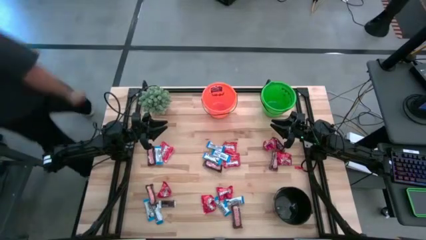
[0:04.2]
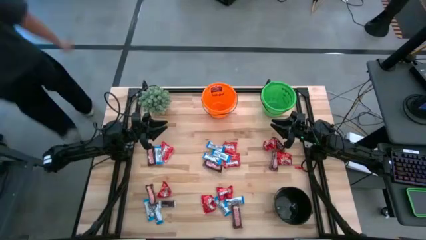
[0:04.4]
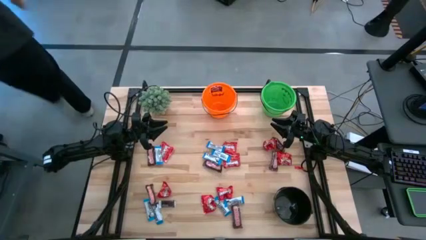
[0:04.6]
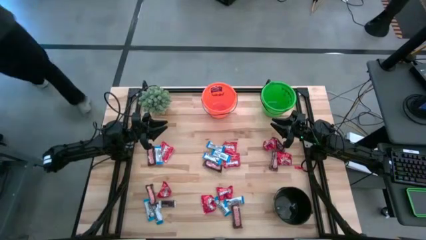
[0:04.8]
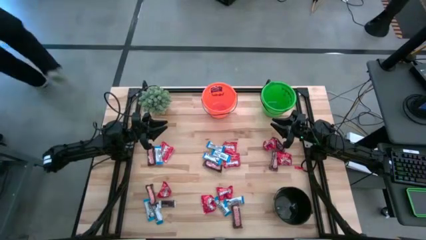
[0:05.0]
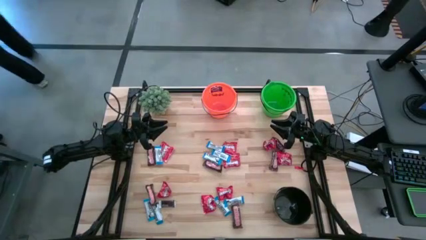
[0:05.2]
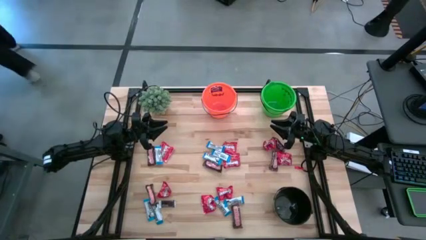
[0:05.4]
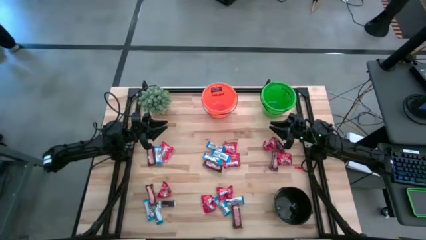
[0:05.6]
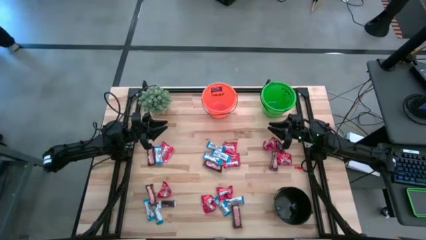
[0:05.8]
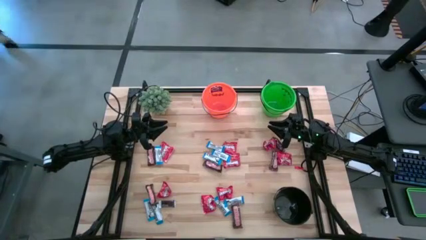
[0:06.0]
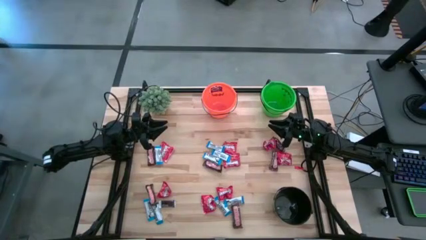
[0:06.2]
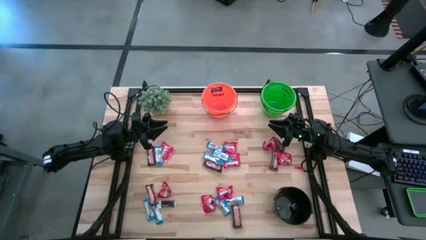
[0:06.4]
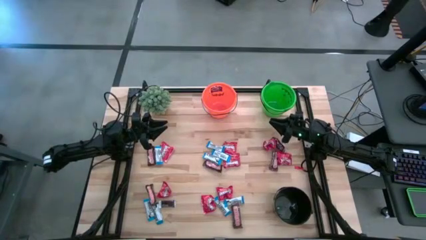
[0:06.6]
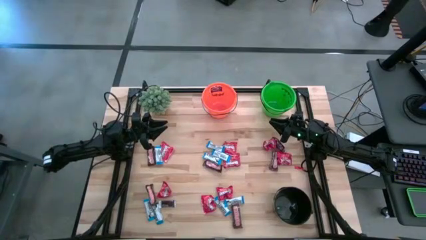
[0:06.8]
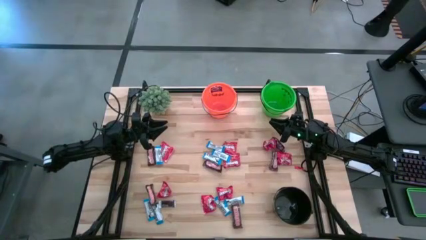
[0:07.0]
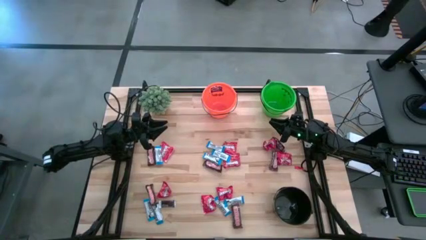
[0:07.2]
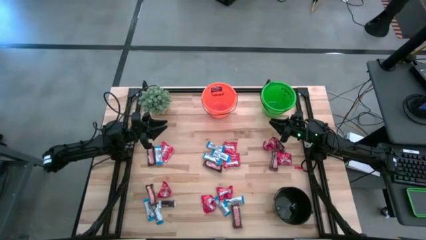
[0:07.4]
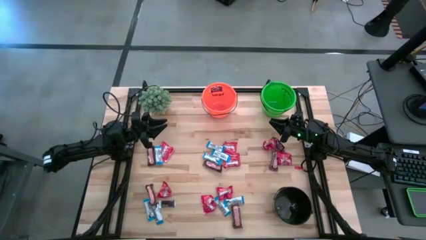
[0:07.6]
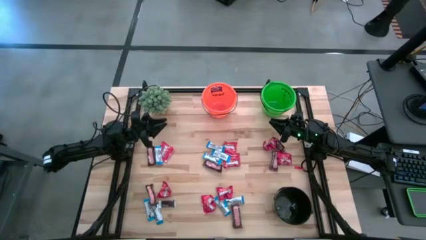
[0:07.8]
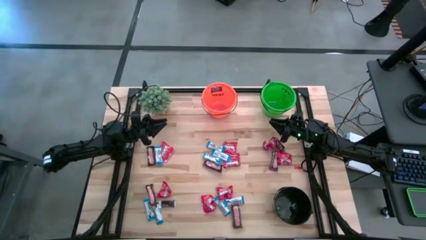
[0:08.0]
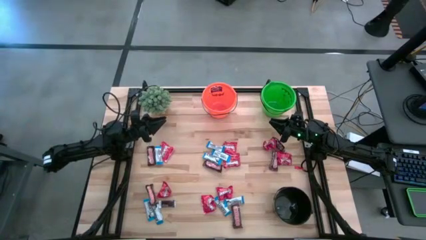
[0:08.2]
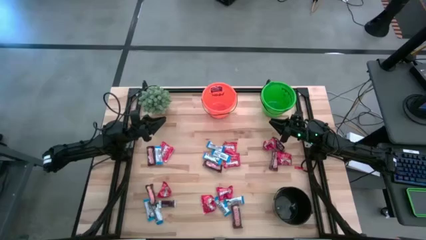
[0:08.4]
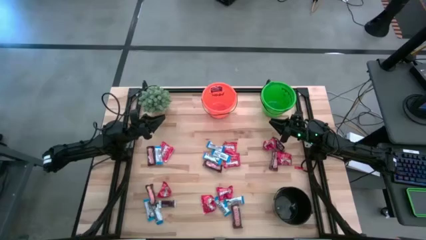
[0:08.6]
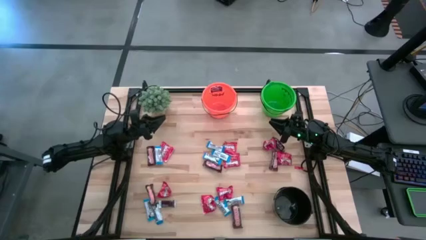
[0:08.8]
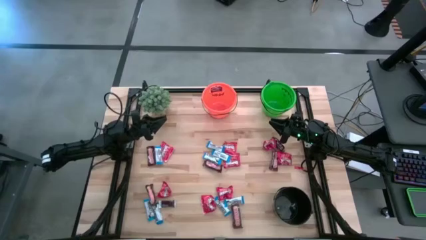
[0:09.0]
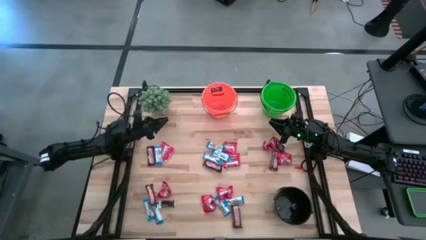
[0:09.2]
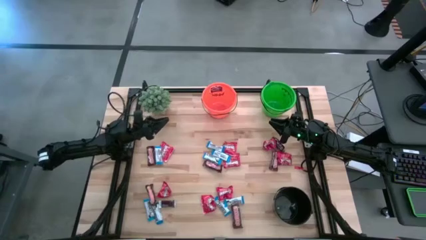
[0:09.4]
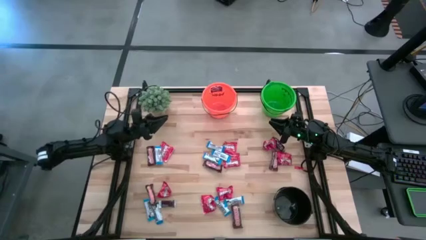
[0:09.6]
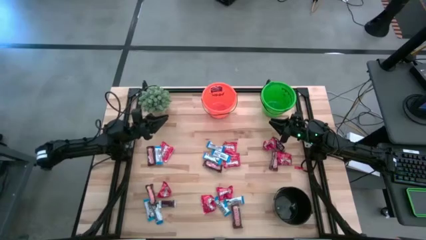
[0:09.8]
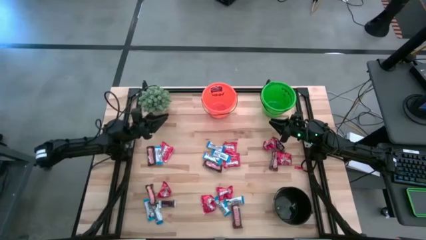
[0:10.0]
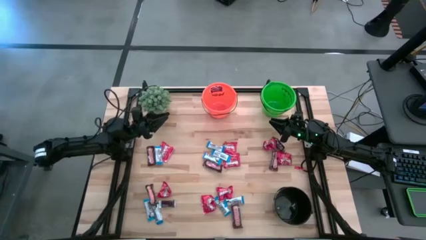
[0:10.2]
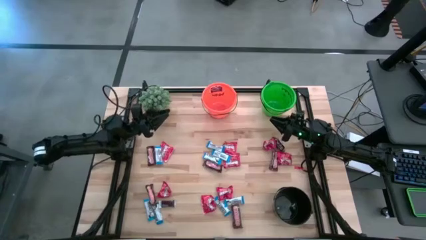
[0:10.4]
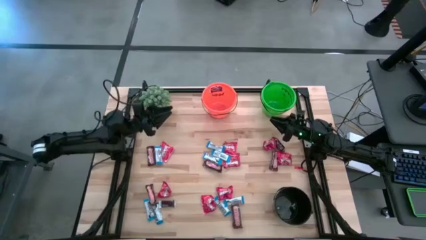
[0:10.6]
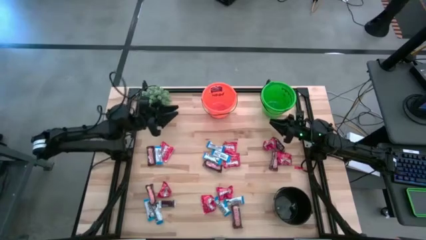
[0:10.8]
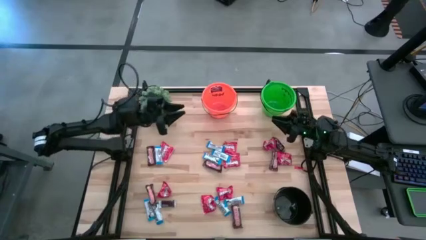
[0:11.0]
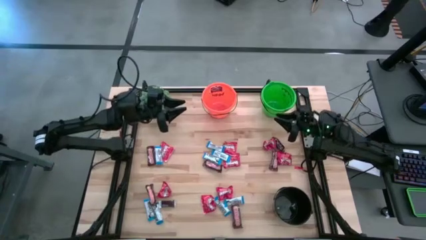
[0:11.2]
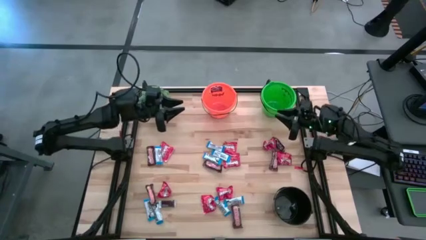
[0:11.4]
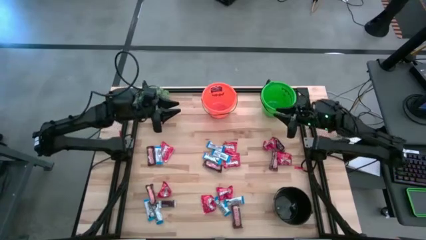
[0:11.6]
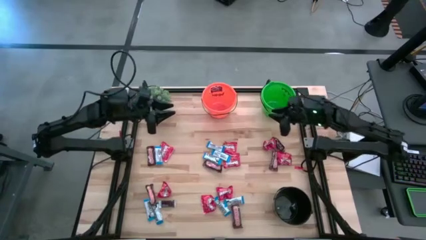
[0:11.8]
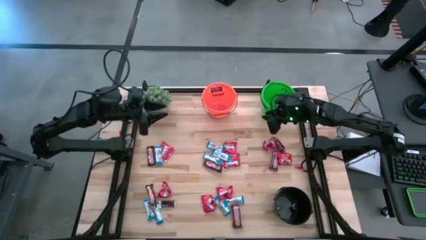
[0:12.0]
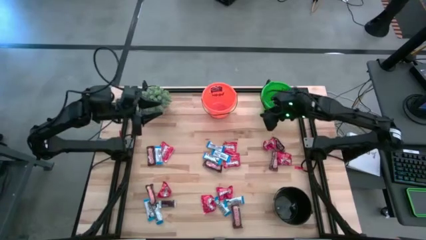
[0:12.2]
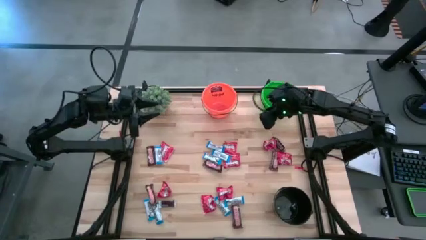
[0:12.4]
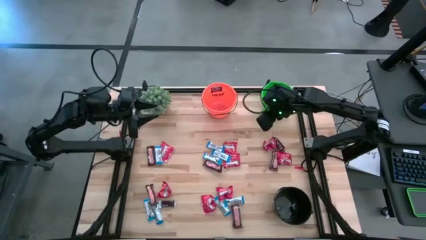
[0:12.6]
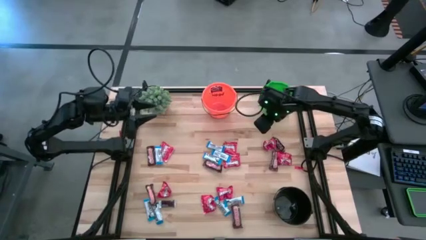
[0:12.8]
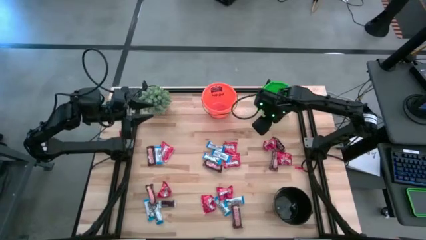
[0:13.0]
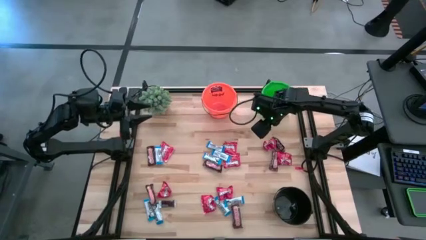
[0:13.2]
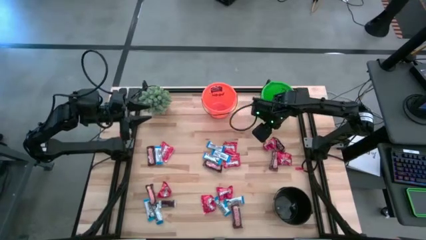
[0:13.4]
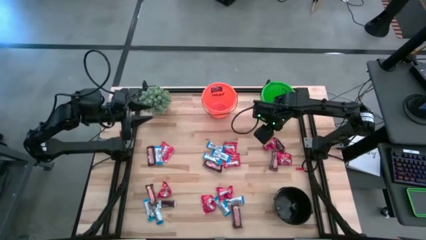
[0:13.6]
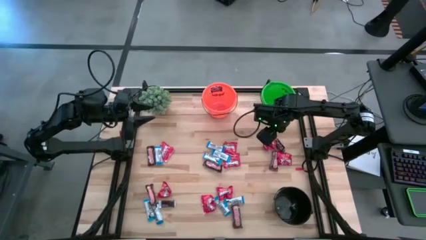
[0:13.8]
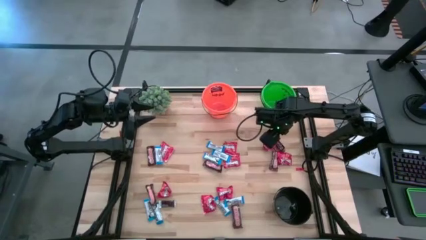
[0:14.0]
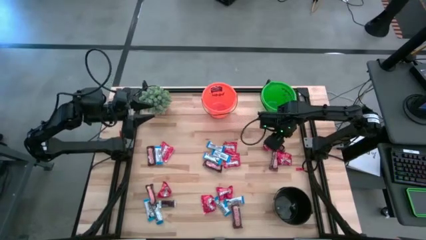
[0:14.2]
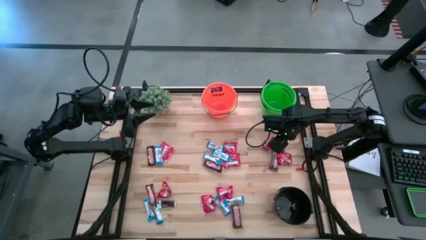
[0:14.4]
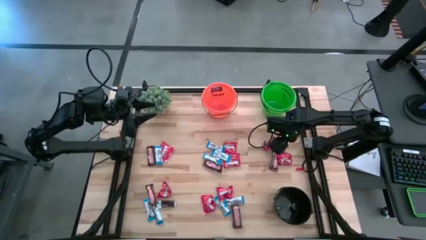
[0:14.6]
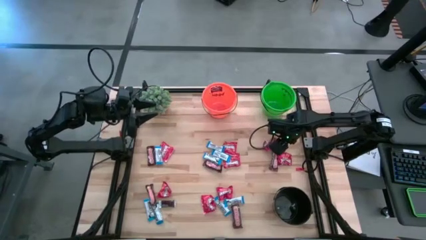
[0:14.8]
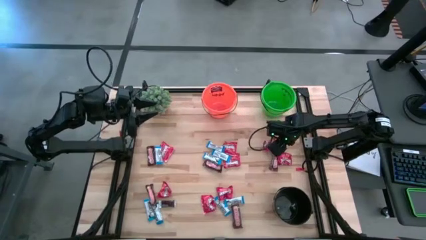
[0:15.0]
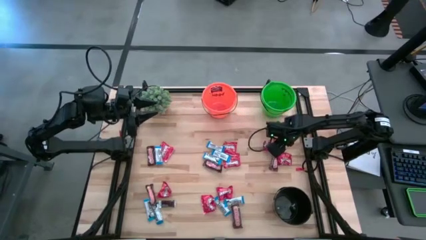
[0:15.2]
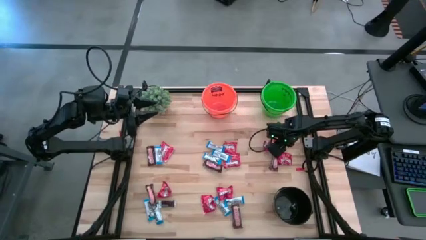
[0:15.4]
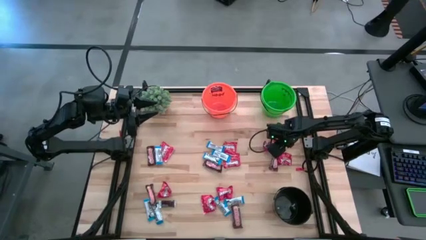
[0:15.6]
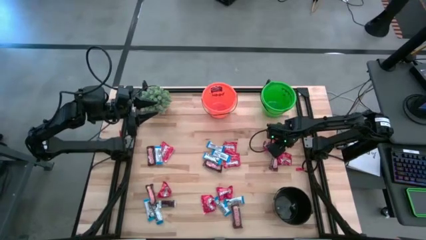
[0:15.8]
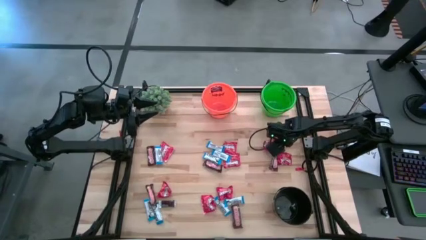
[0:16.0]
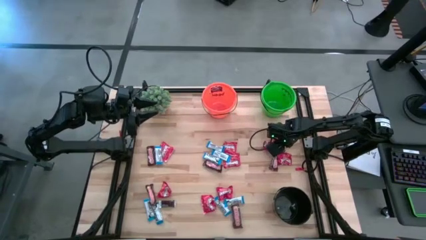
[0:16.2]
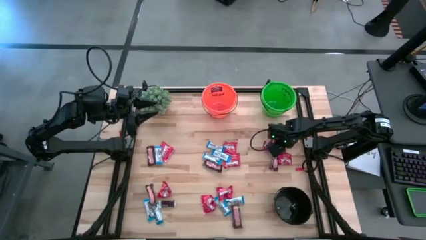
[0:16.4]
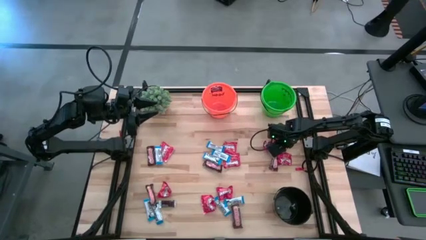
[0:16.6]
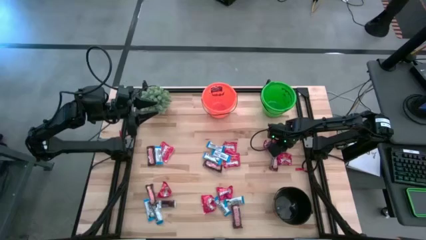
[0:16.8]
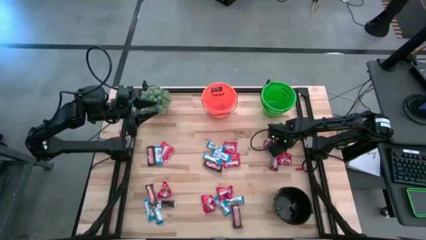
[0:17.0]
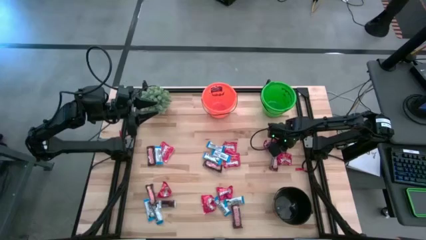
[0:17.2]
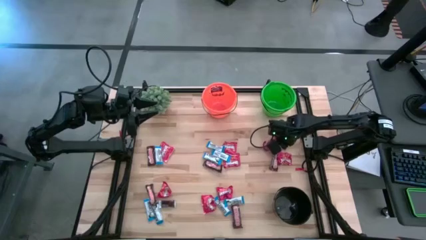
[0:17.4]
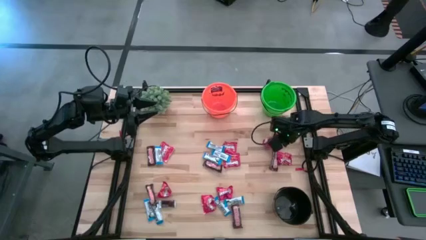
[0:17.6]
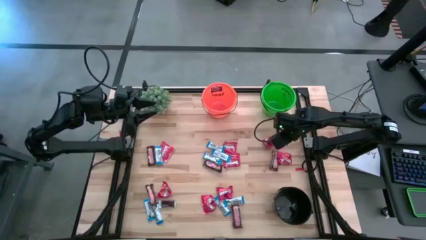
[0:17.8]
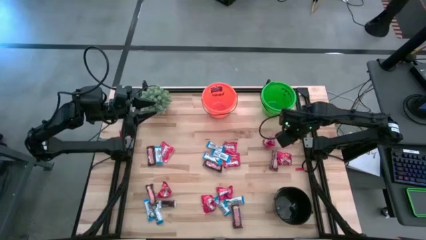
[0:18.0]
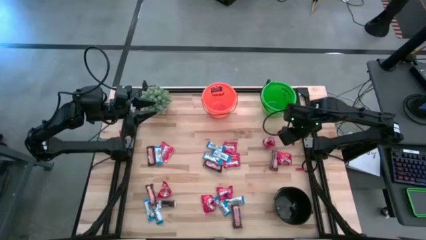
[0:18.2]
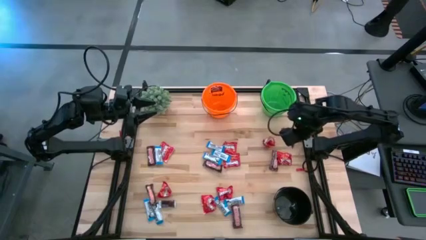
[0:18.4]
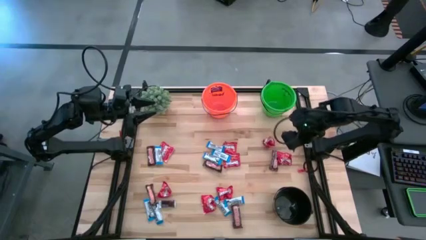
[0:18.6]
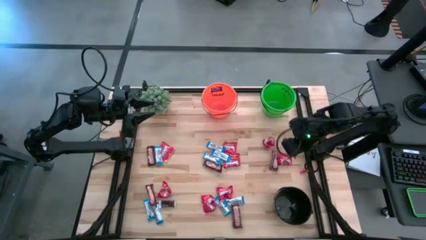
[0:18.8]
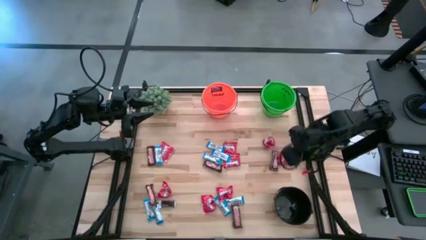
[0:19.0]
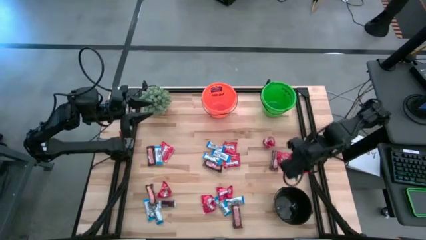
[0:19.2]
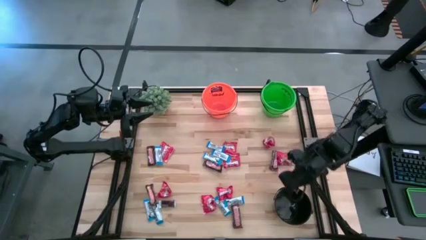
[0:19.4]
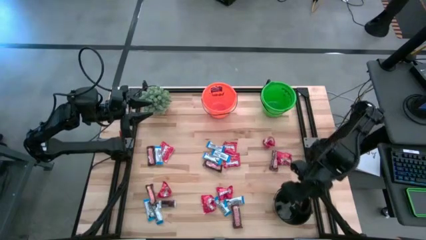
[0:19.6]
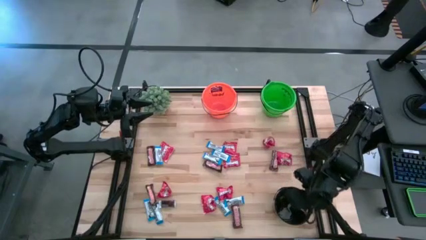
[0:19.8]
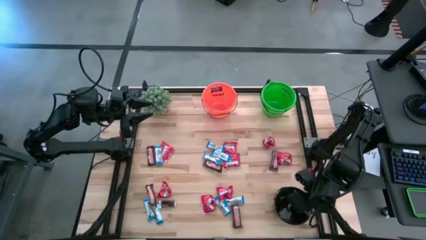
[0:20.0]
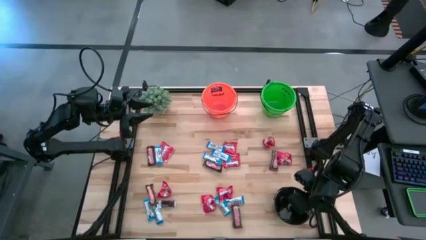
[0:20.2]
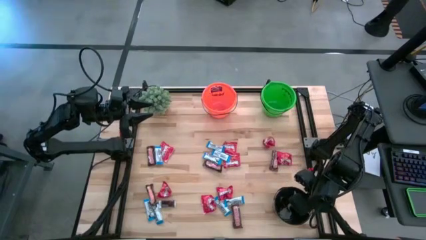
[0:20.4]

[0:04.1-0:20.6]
Task: Organize candy in baskets
Put the brown chocolate bar into the black bucket
